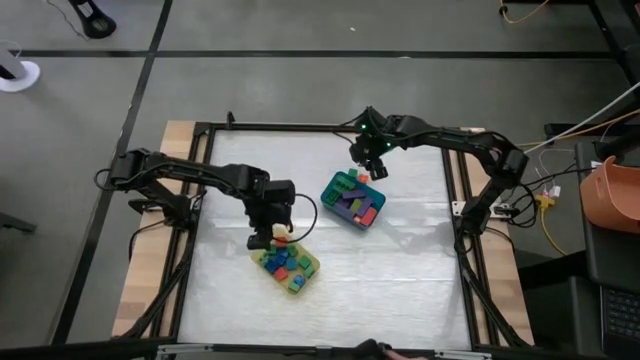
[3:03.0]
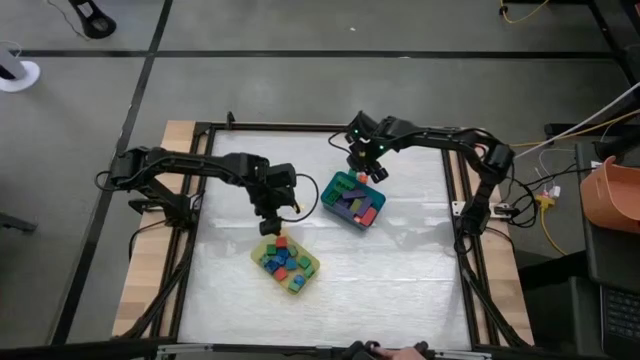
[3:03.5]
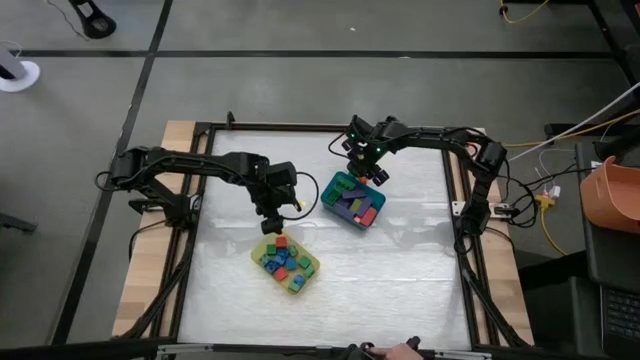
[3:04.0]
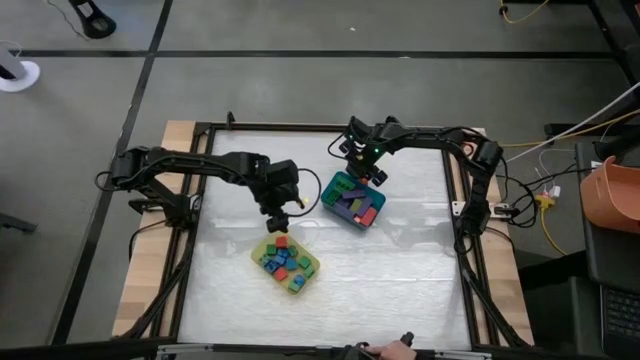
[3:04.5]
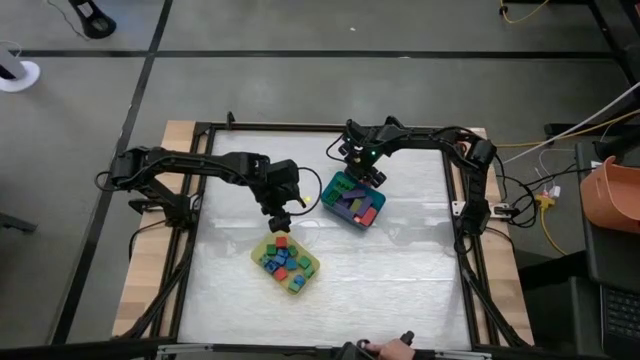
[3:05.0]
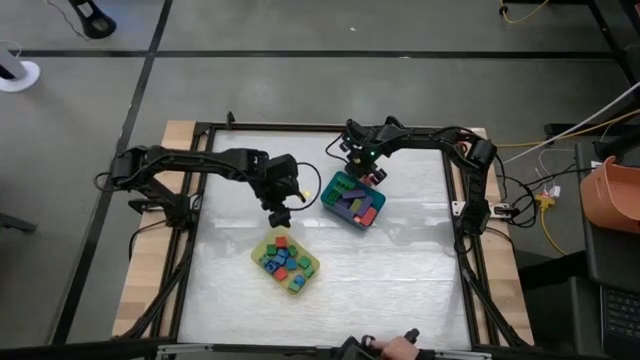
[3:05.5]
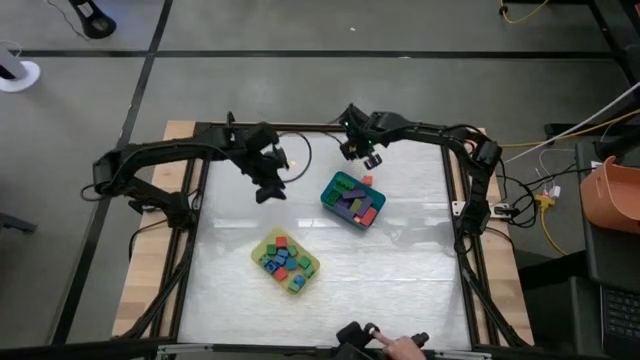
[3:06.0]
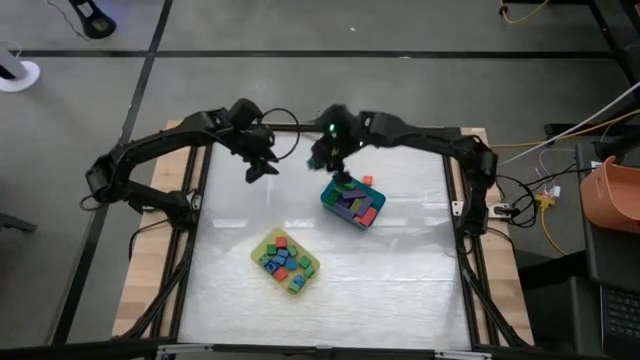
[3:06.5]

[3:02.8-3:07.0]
Task: Sort blocks by size
Put the small green wooden block into the yellow bin

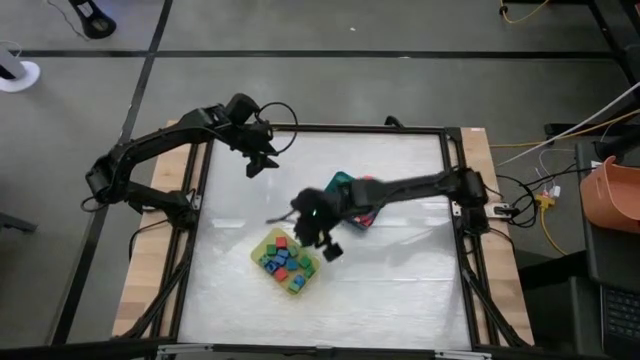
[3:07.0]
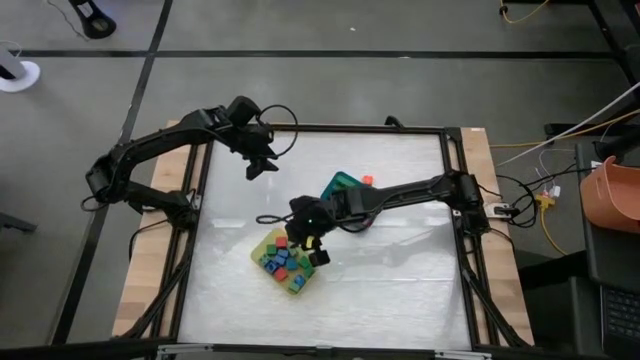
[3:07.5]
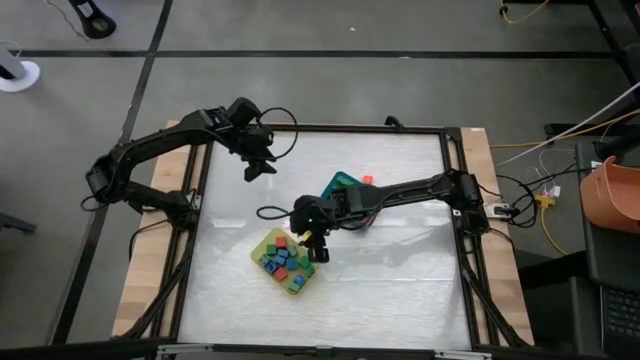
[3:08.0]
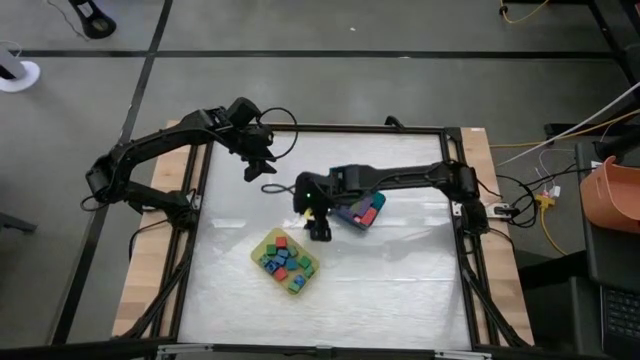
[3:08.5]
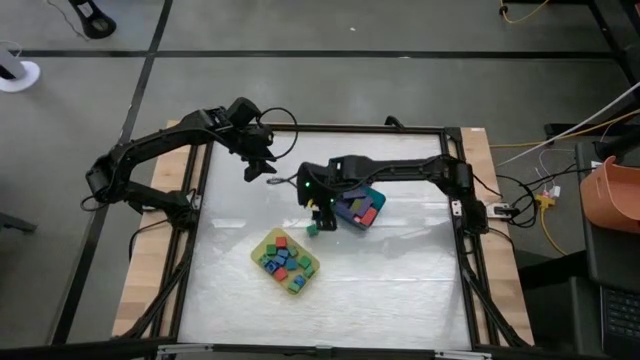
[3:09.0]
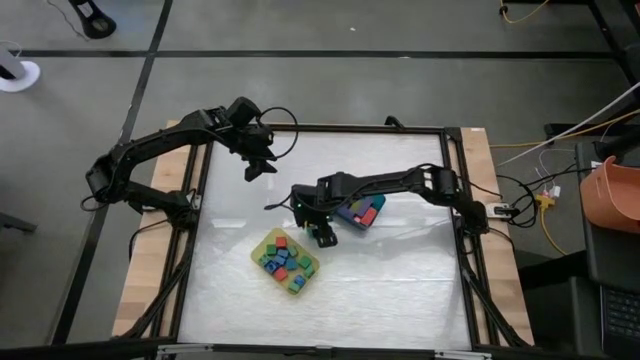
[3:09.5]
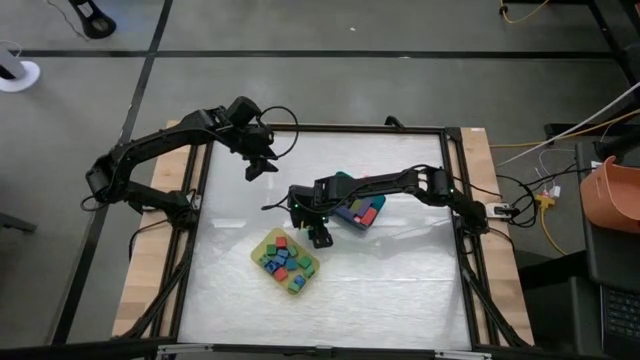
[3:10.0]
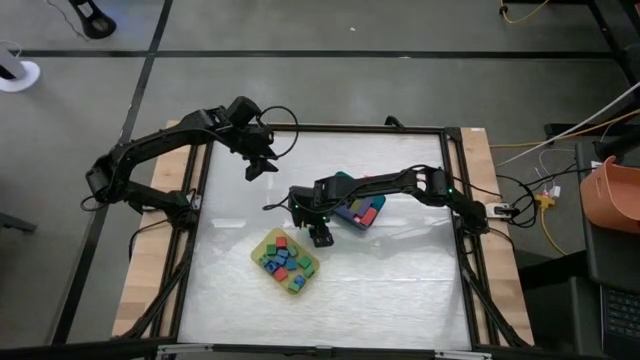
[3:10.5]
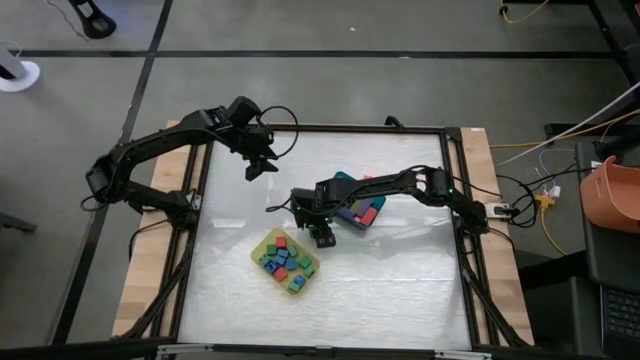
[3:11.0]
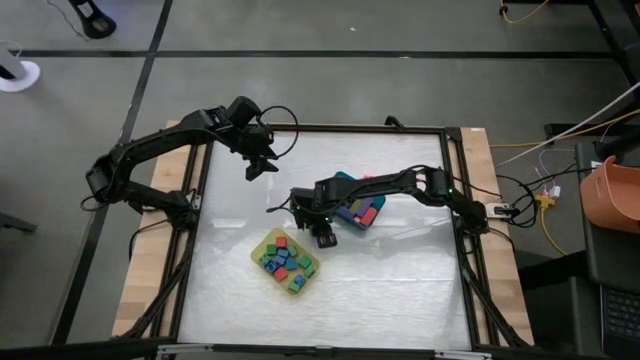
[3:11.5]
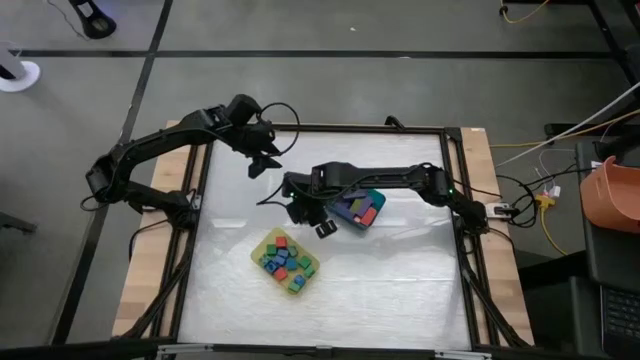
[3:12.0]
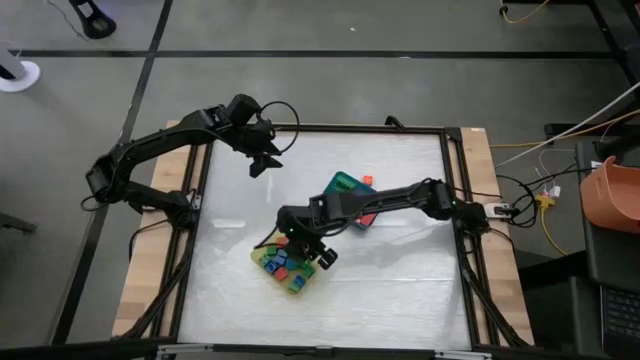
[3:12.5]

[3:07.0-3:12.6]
Put the small green wooden block into the yellow bin

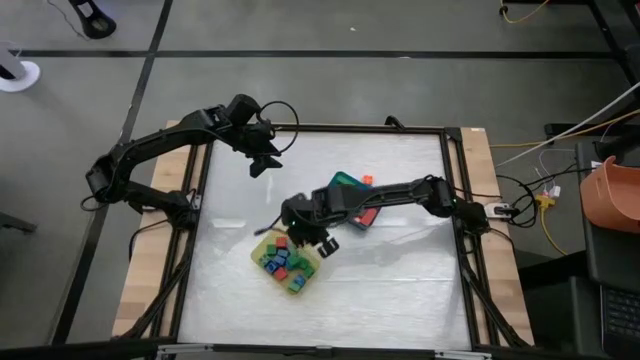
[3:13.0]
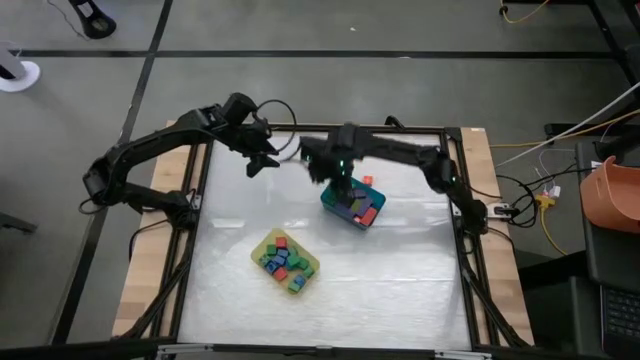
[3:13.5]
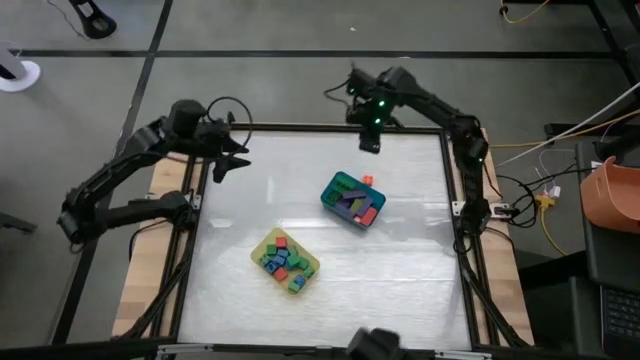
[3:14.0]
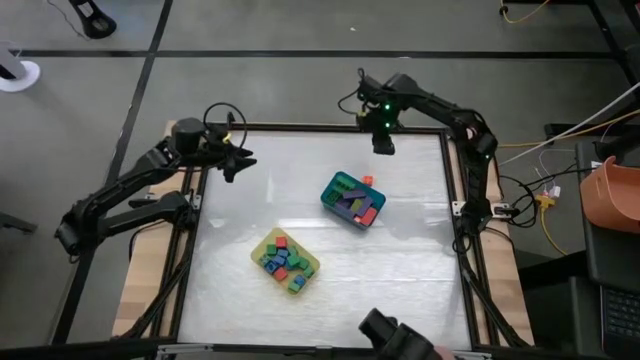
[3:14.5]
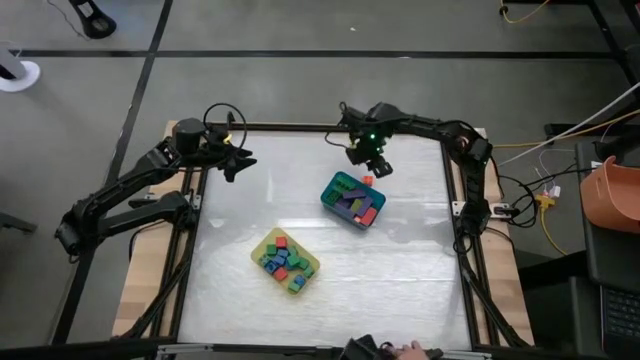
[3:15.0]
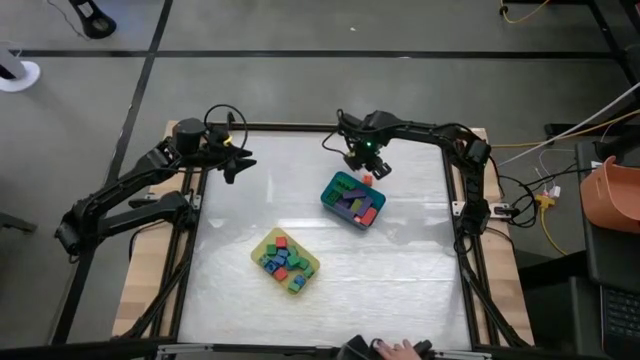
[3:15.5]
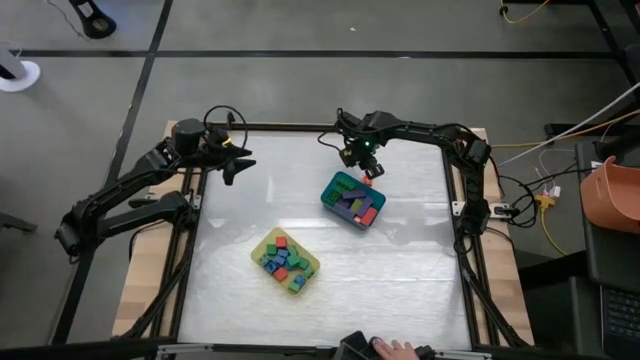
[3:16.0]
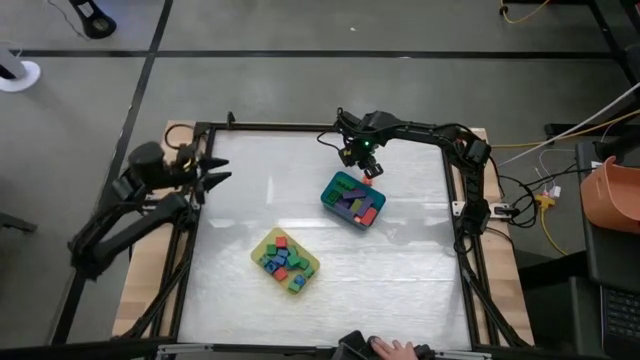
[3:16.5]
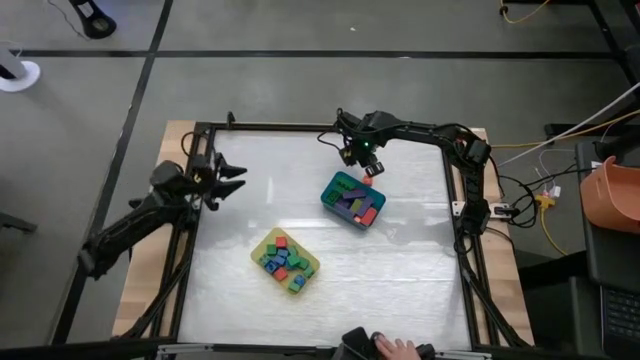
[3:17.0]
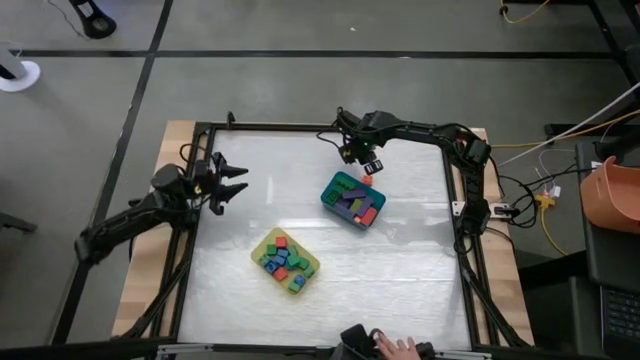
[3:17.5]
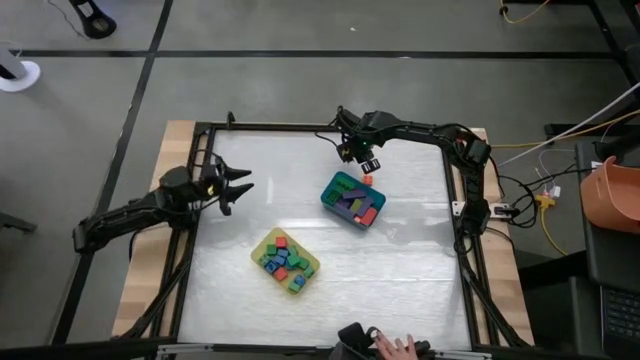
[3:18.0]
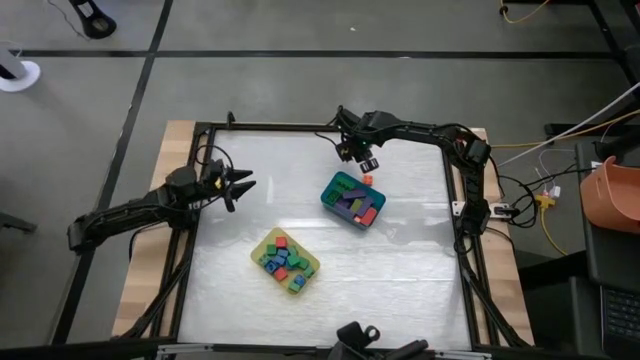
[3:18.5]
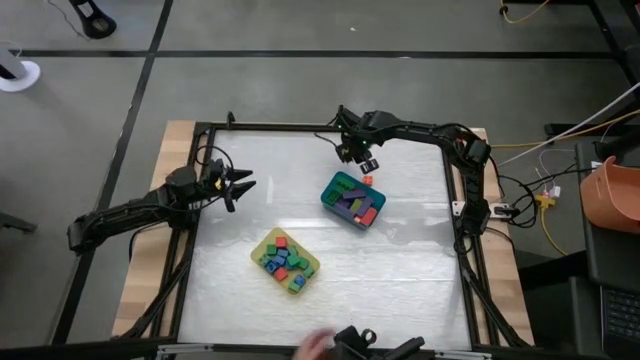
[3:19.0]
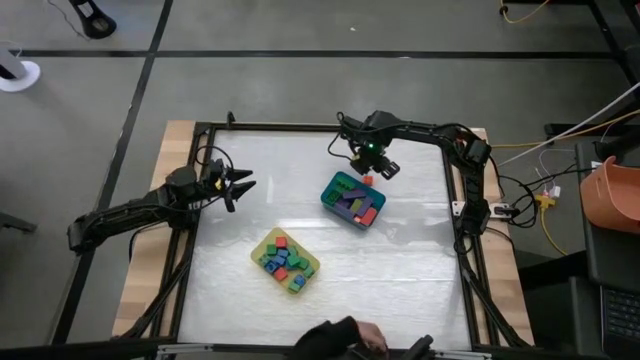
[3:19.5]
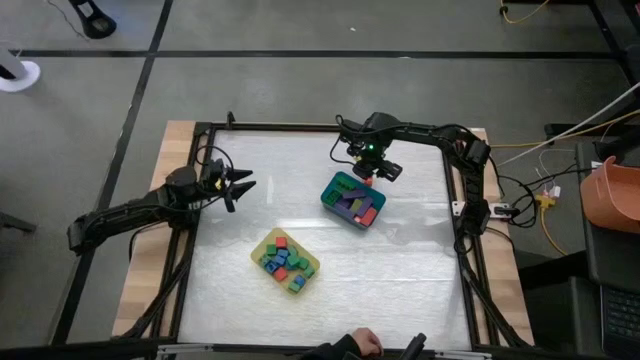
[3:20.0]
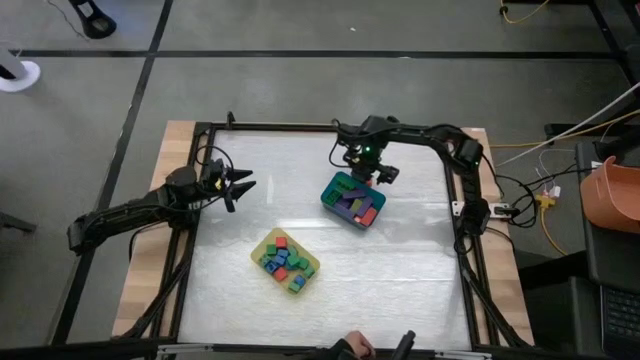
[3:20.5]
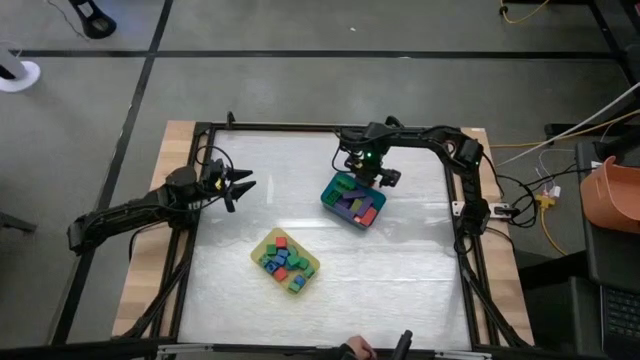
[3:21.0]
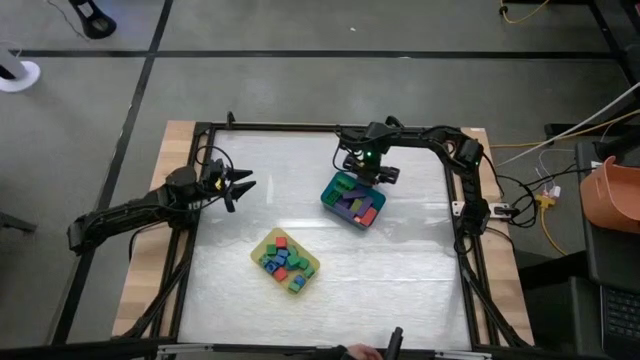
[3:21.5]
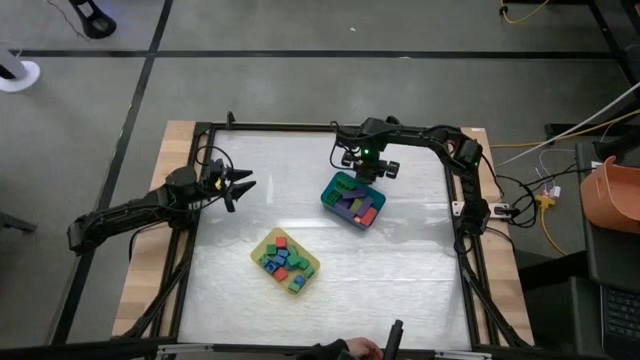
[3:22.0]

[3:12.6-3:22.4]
Put the small orange game piece into the yellow bin

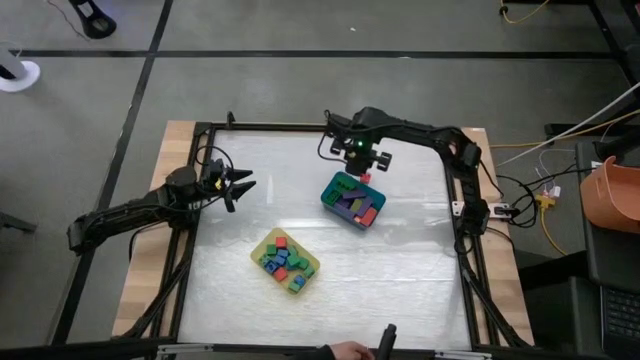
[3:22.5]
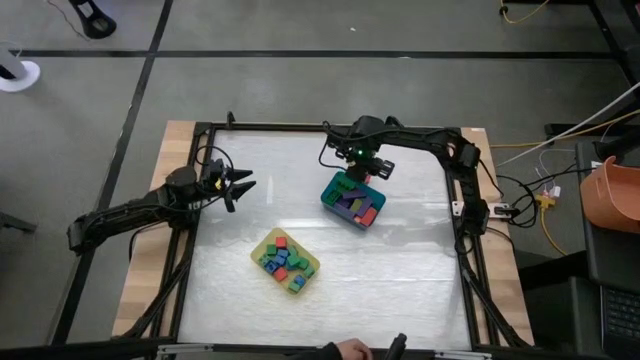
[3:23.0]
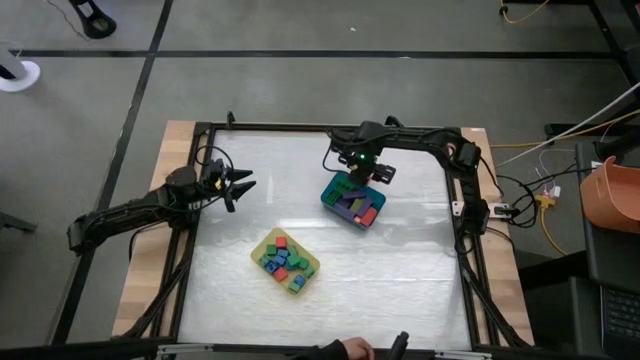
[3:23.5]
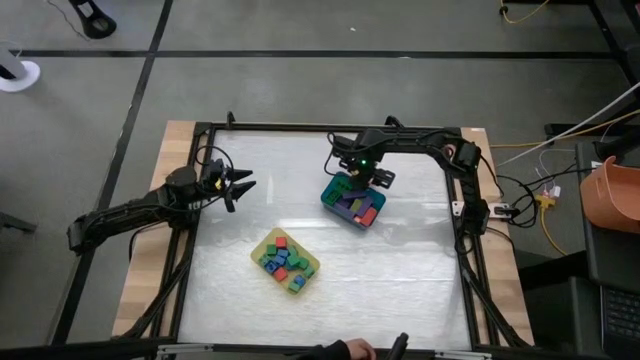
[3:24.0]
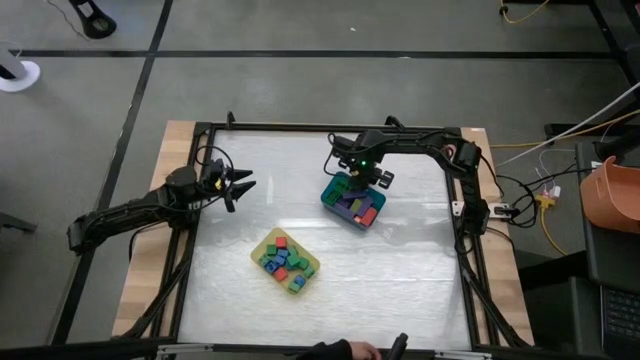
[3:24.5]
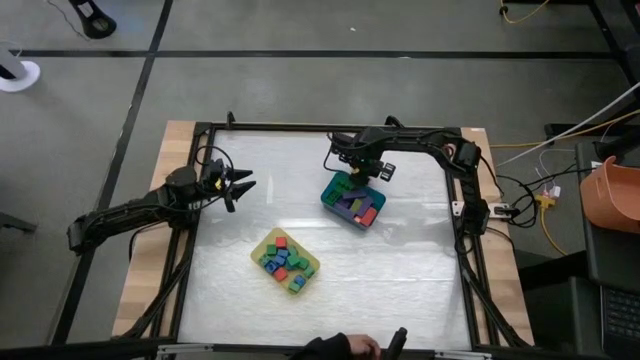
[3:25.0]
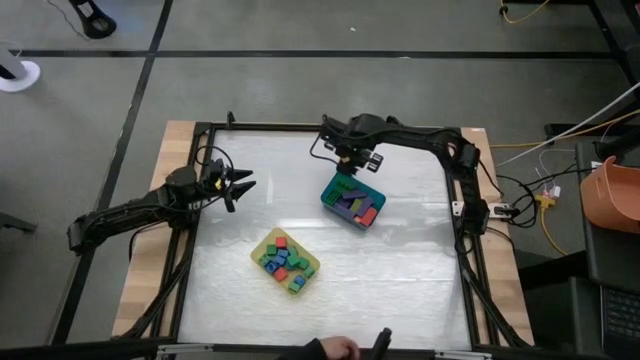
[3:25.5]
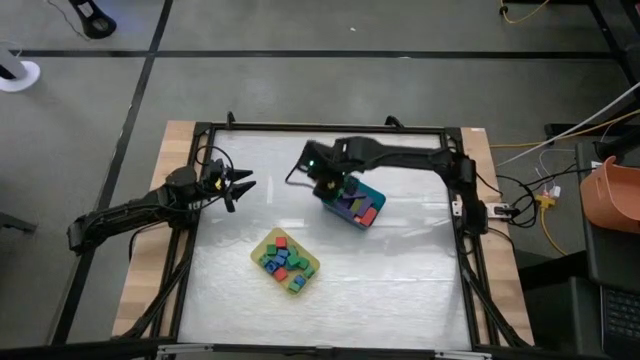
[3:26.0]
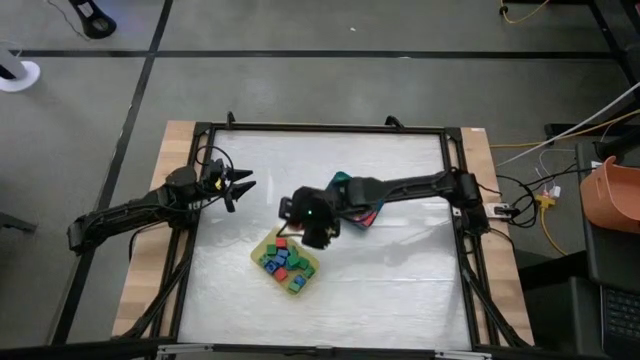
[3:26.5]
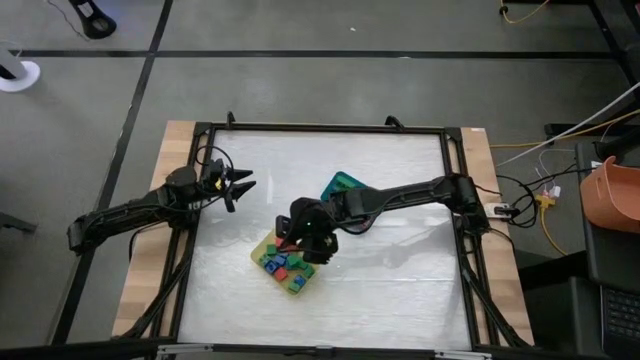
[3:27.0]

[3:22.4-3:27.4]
Put the small orange game piece into the yellow bin
